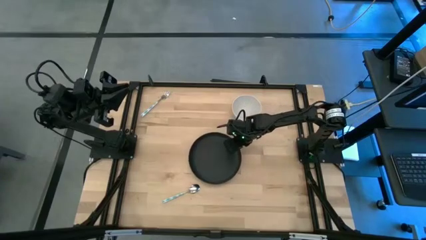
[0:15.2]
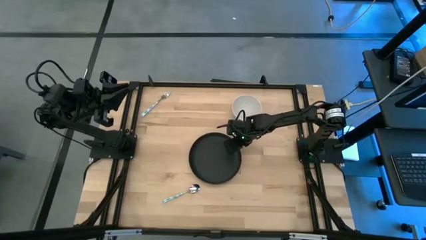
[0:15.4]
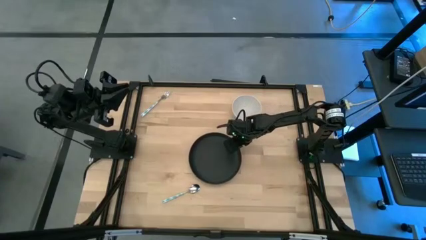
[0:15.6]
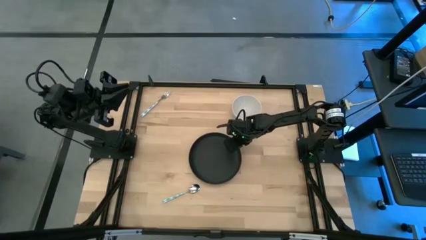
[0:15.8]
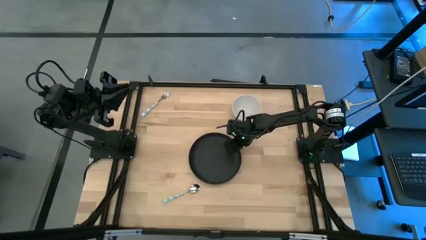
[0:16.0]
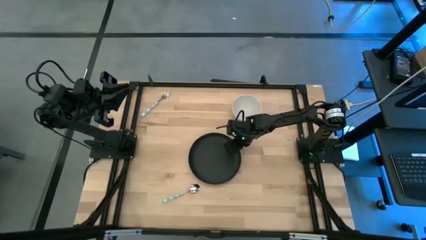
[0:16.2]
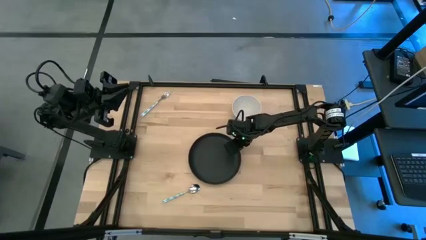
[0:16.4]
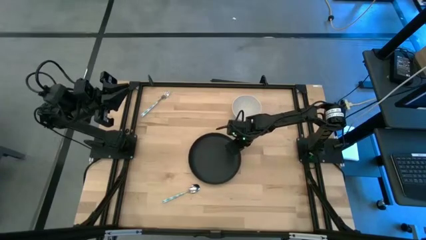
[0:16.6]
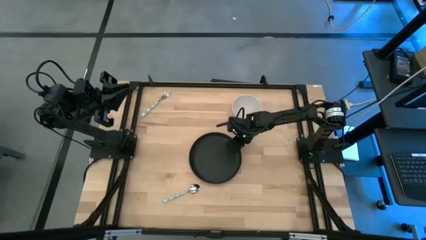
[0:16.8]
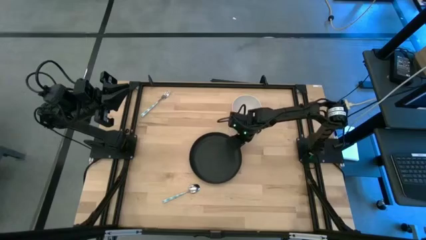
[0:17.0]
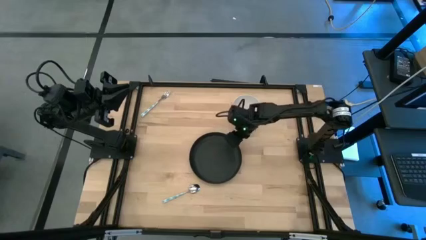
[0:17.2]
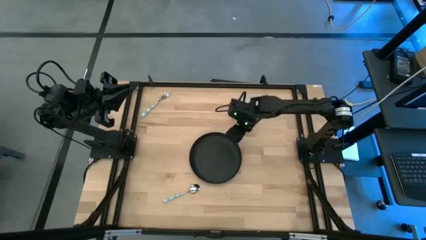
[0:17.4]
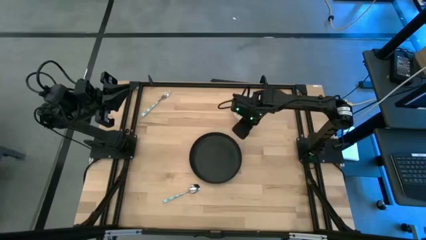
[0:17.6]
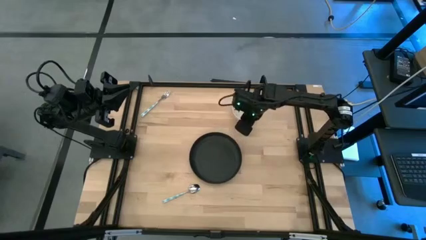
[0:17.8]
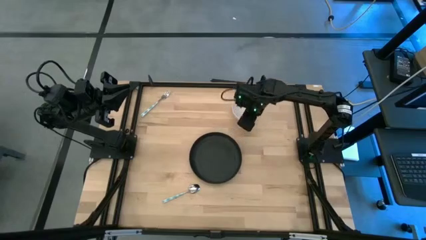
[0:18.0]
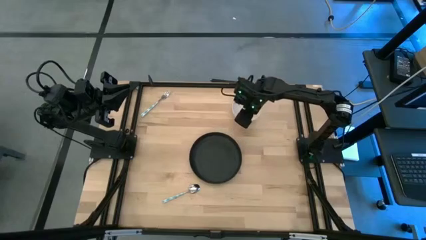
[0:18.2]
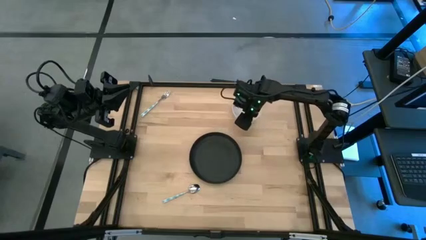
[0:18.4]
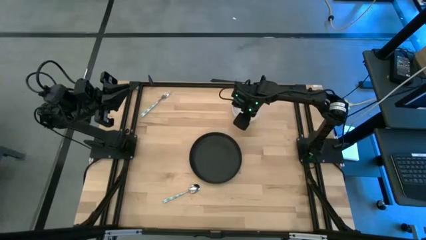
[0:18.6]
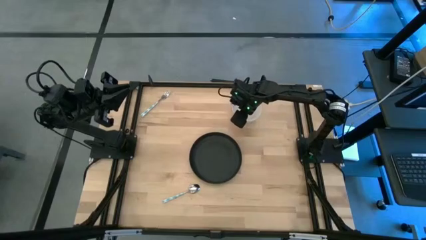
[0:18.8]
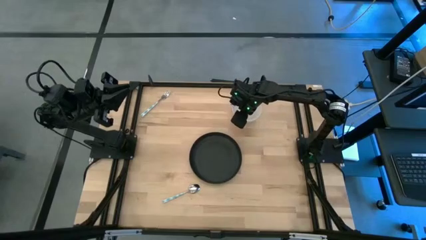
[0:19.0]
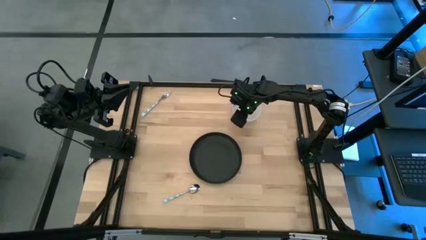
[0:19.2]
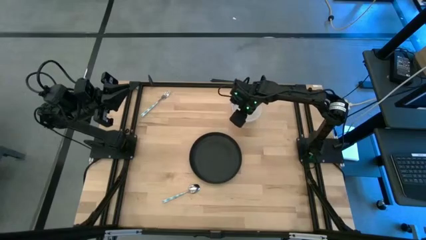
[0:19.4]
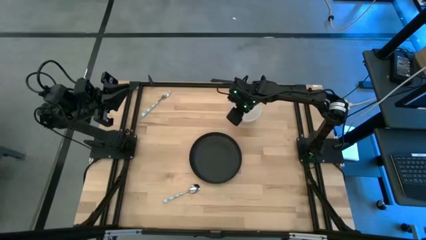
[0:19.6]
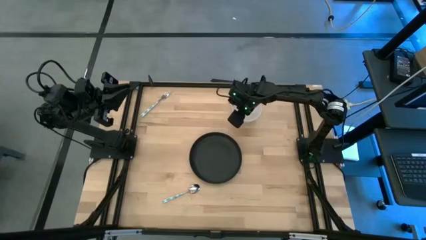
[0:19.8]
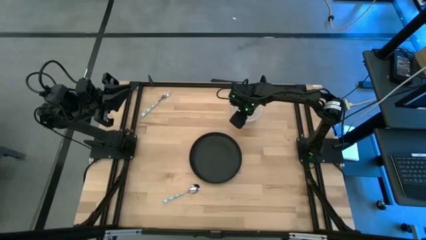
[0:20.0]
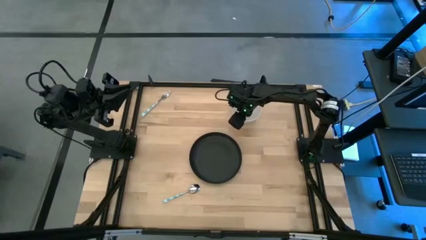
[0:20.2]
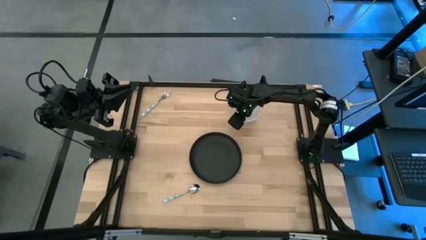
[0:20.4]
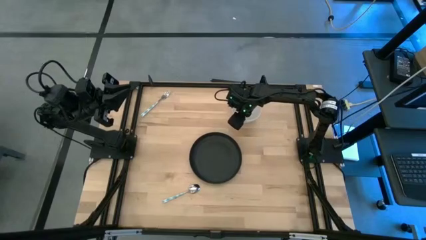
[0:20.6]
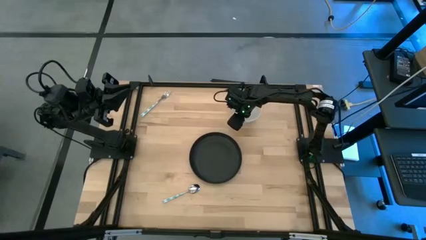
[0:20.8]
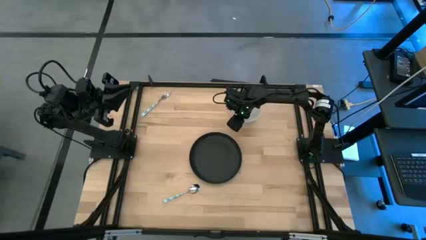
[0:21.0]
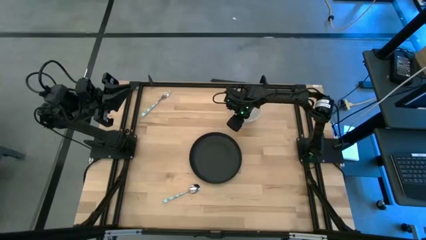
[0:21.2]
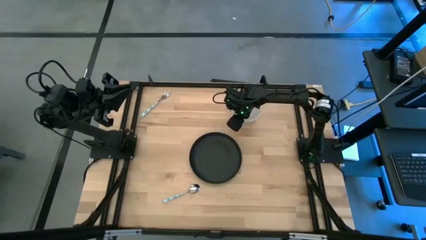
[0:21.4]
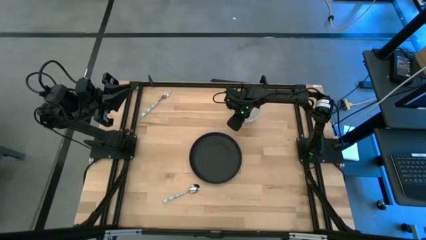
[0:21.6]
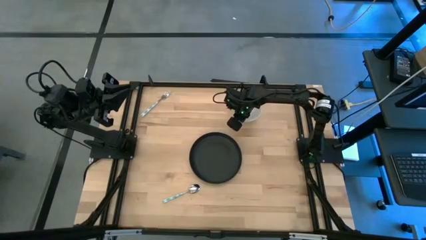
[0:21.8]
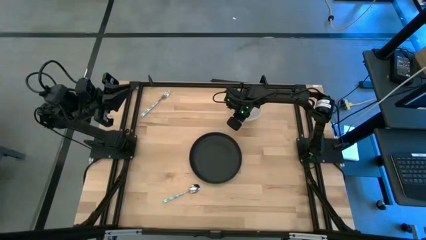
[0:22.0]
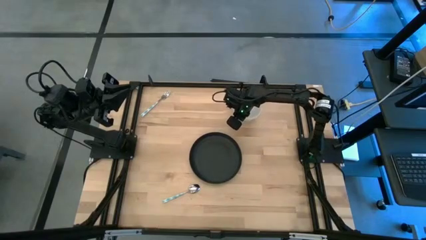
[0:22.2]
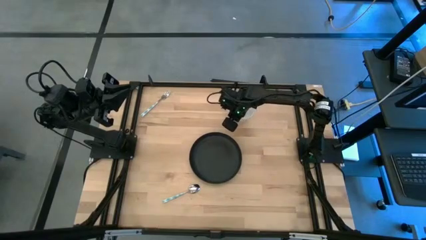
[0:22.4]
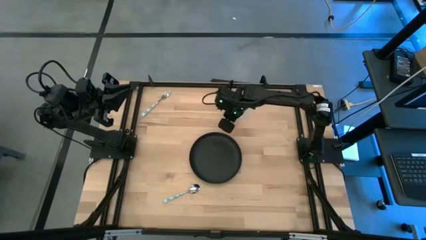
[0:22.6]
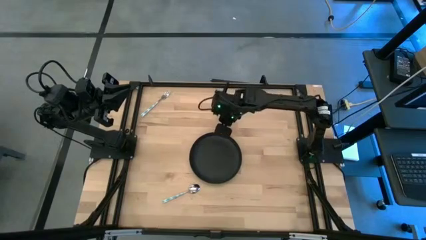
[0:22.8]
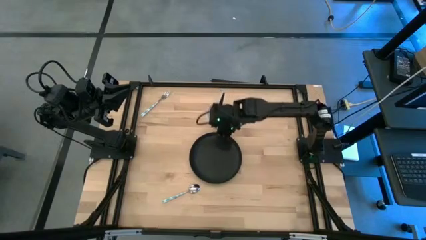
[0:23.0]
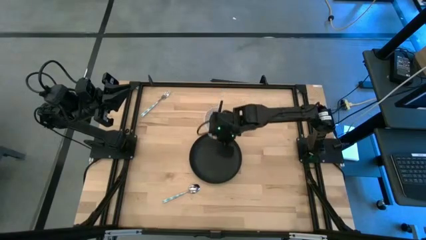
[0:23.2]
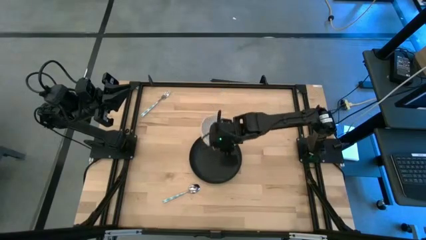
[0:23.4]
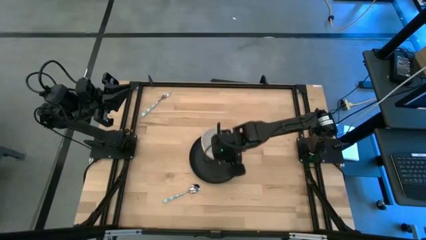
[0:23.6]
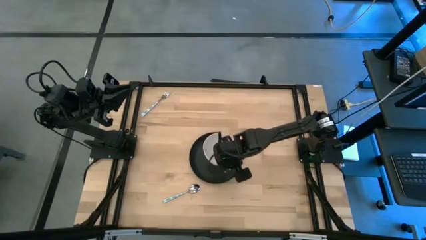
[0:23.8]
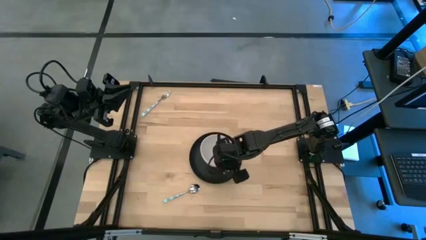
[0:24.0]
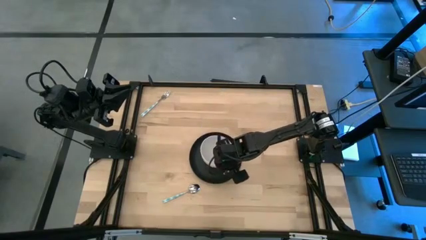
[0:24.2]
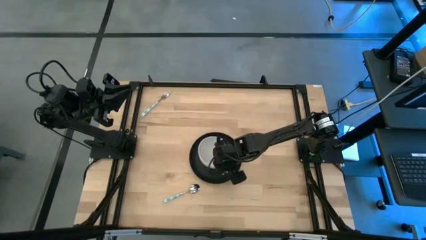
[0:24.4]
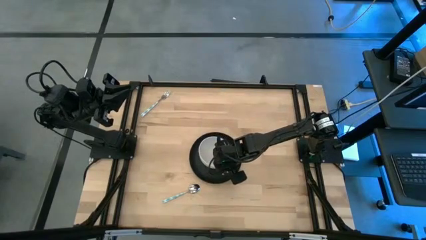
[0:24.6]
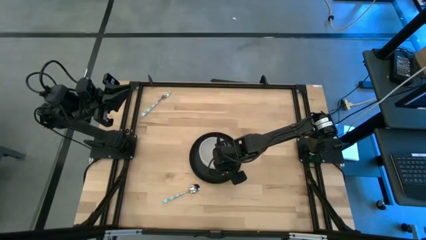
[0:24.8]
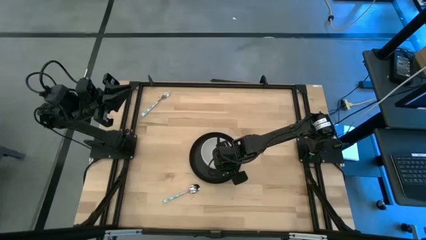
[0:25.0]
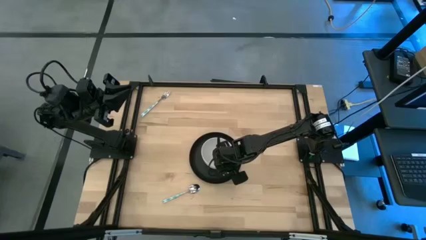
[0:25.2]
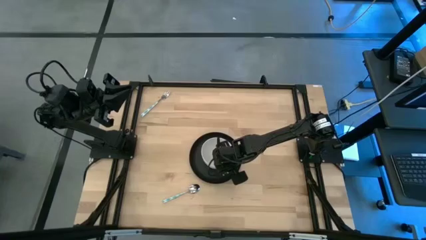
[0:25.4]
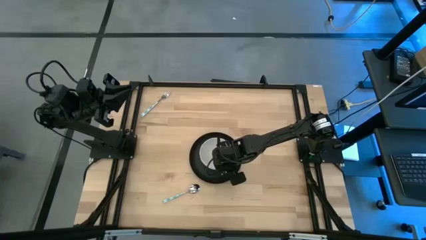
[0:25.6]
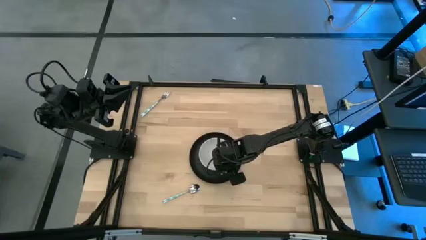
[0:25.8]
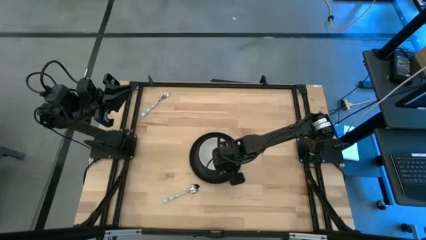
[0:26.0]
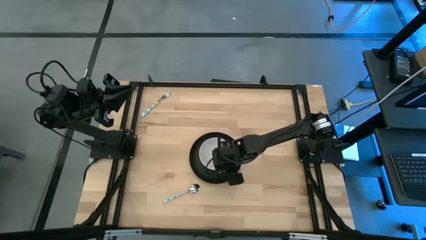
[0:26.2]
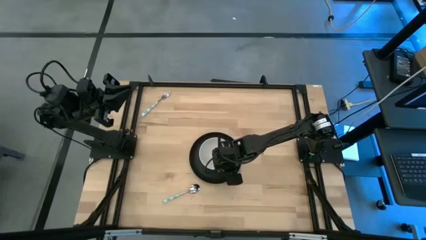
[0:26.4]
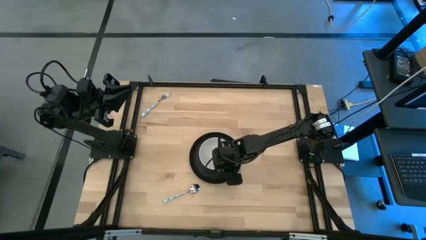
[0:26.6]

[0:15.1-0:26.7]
Task: Set table place
Put the white bowl on the black plate

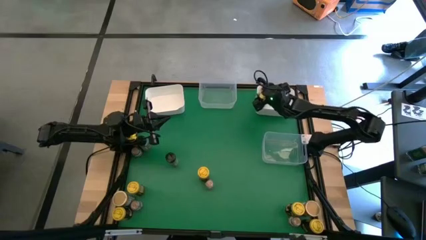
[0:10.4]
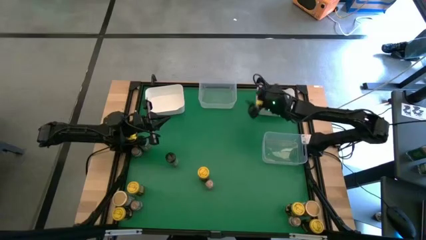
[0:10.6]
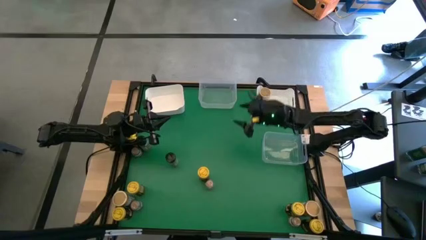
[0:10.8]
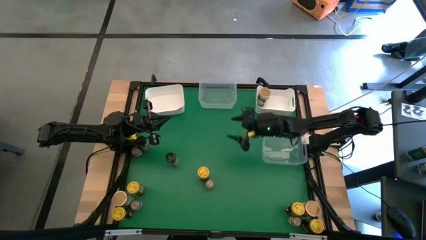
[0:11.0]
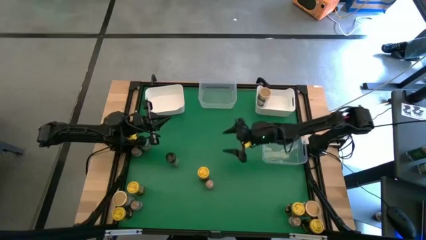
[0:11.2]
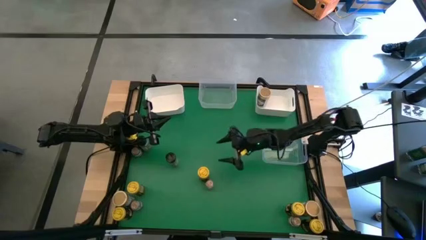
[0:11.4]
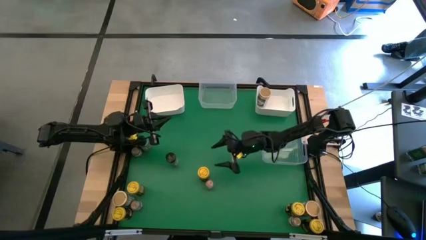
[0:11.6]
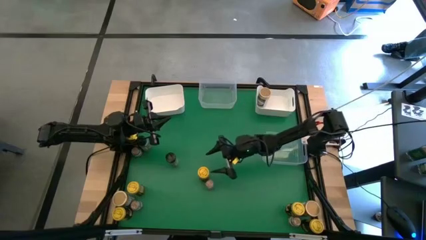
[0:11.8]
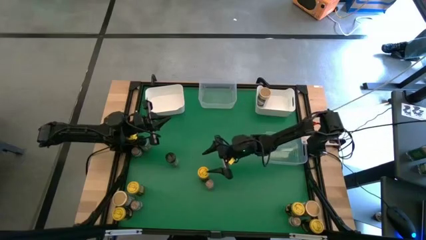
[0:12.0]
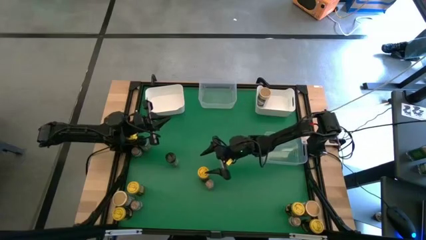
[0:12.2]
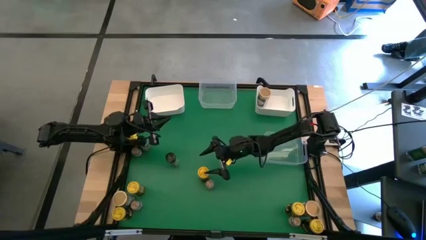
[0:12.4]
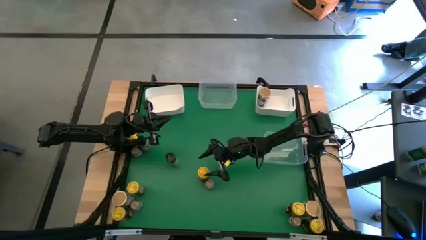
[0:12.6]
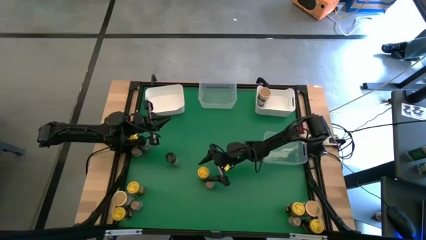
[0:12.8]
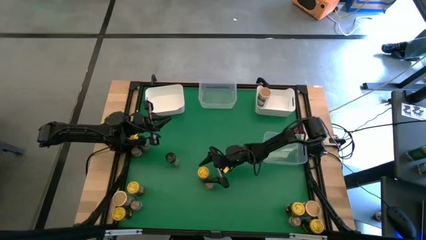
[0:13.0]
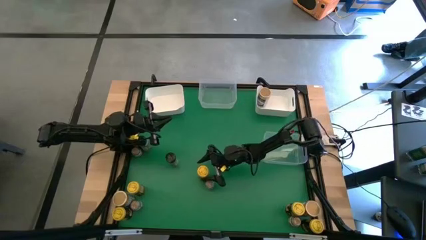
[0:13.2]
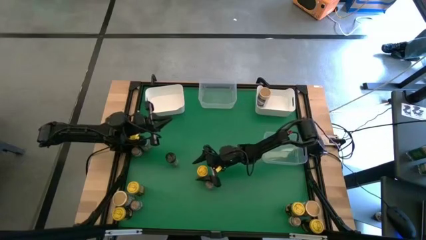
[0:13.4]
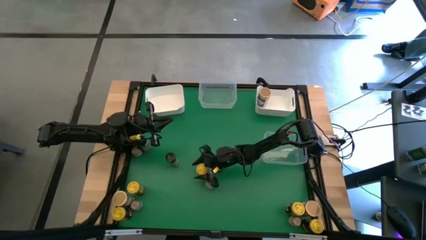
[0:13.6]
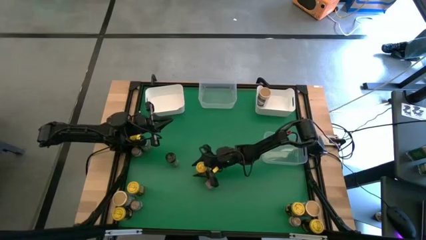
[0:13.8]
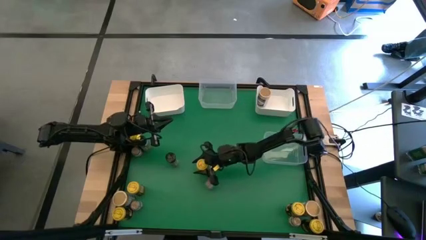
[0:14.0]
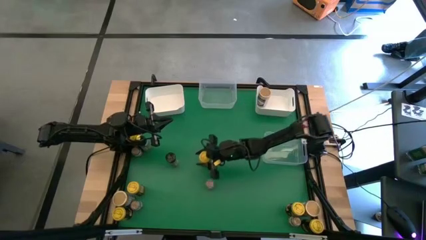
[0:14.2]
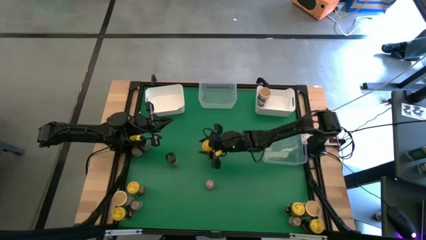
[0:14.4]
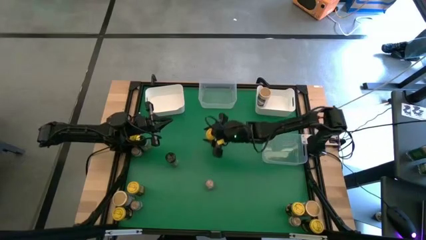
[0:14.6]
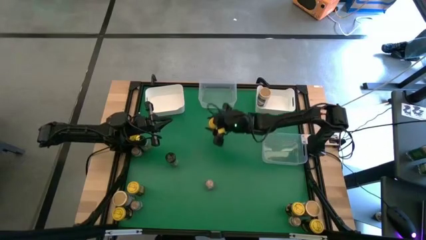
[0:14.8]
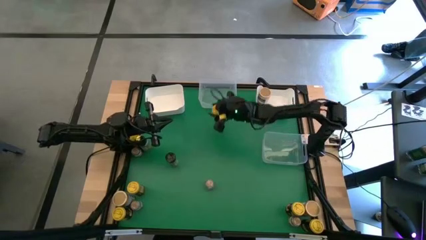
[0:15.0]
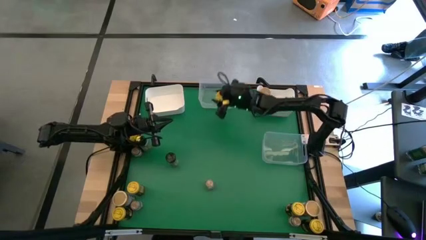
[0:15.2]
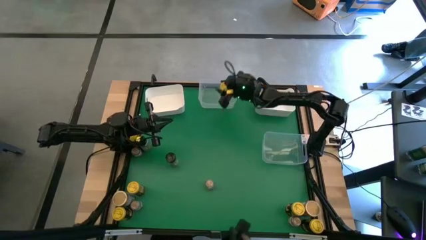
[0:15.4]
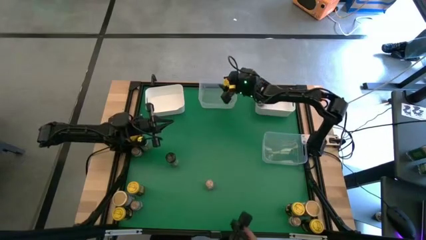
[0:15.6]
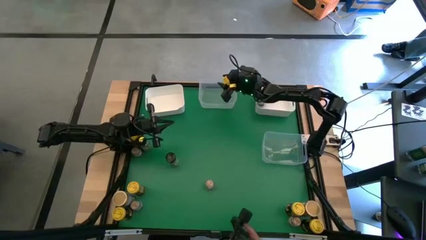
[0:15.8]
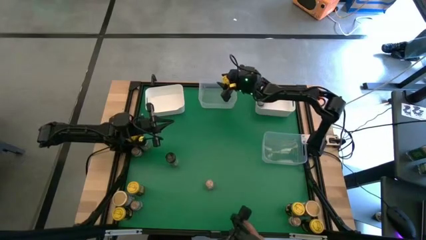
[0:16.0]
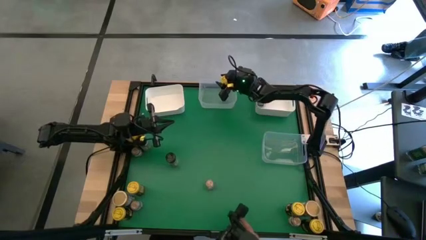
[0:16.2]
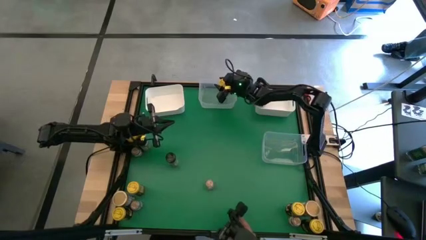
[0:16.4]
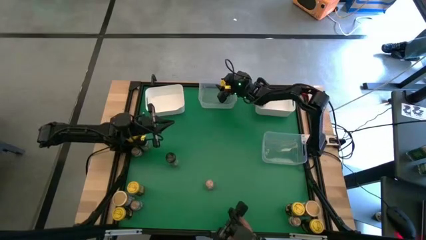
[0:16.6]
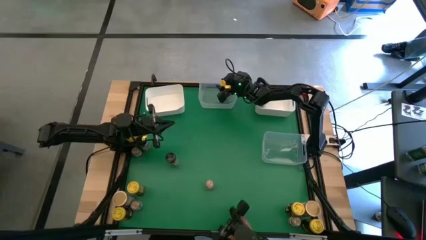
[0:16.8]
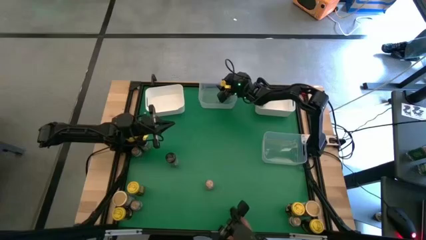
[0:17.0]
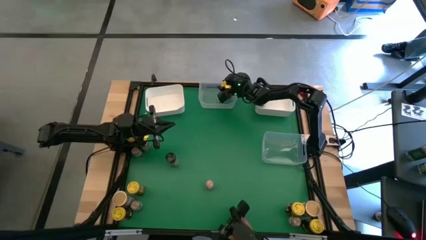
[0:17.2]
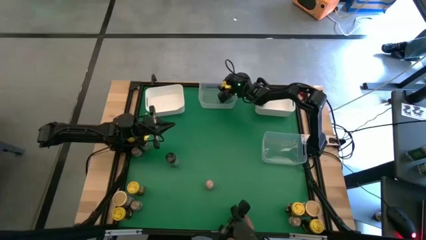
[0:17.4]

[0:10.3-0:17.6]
Task: Sort spices by type
Put the yellow seasoning bottle into the top transparent bin
